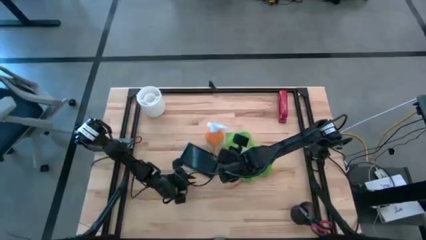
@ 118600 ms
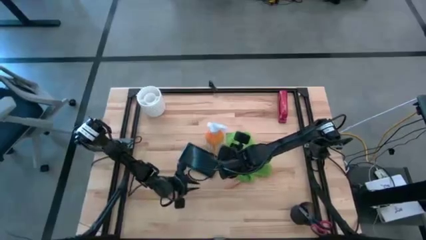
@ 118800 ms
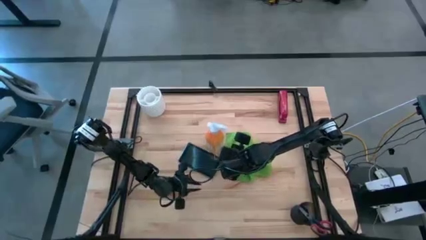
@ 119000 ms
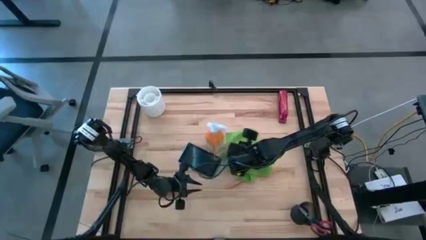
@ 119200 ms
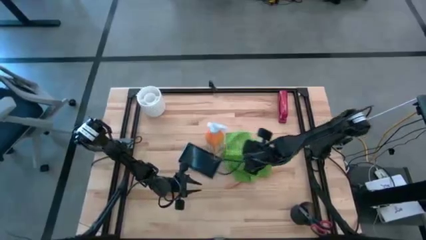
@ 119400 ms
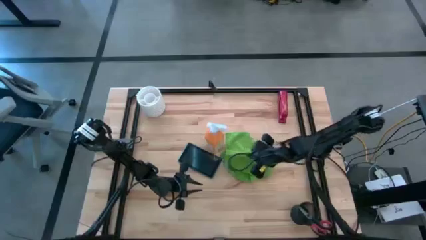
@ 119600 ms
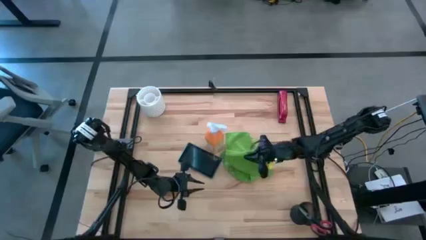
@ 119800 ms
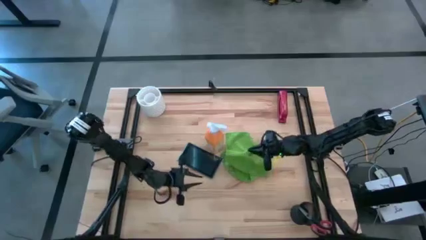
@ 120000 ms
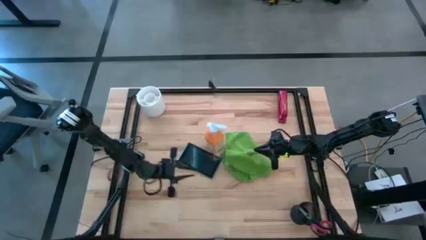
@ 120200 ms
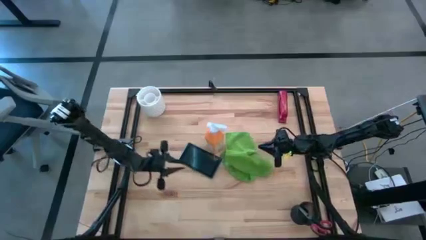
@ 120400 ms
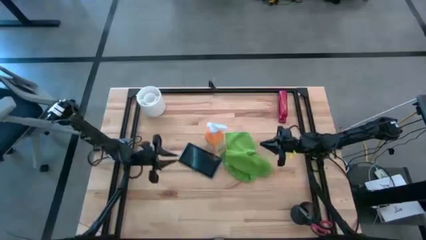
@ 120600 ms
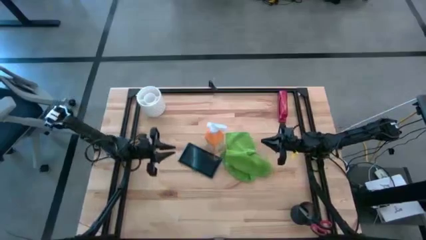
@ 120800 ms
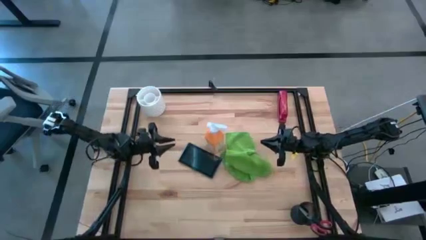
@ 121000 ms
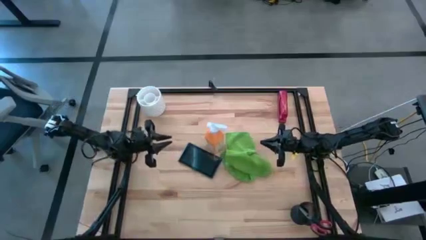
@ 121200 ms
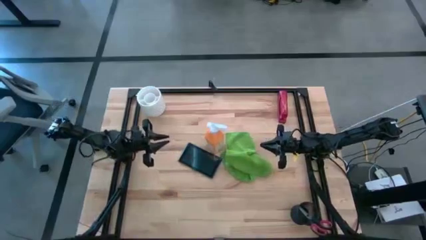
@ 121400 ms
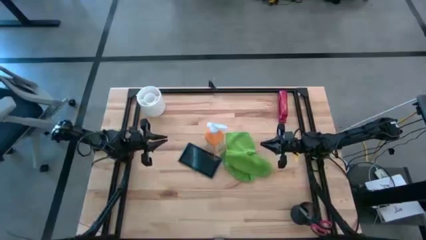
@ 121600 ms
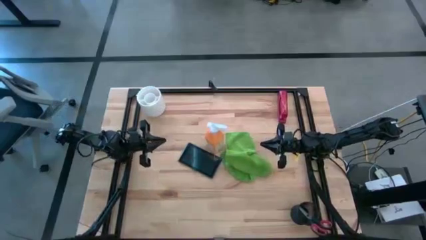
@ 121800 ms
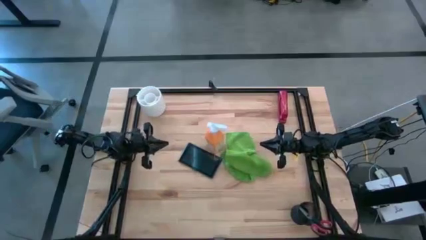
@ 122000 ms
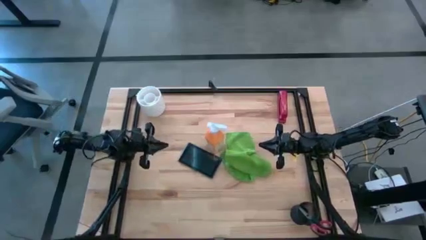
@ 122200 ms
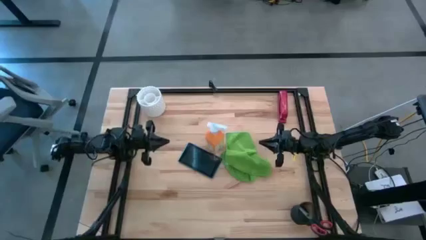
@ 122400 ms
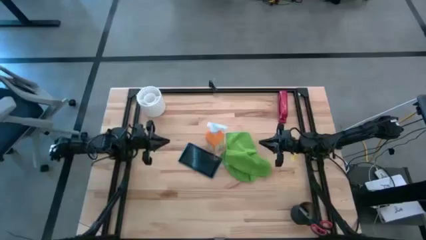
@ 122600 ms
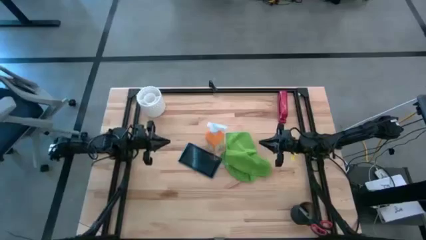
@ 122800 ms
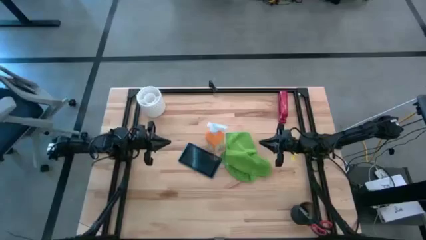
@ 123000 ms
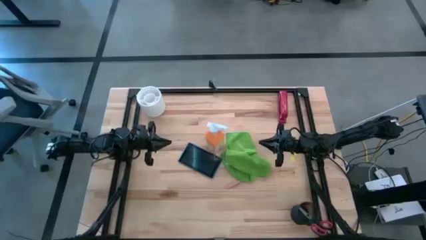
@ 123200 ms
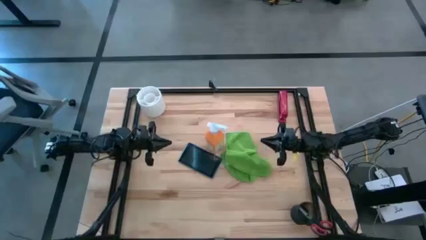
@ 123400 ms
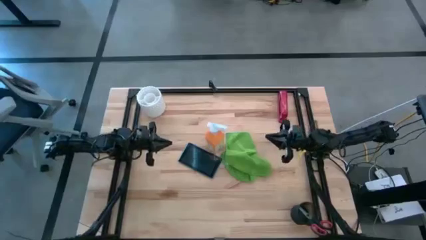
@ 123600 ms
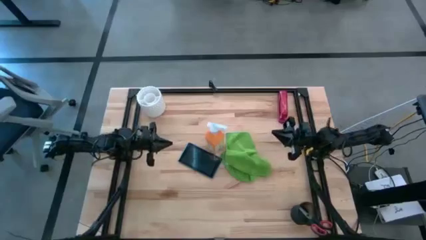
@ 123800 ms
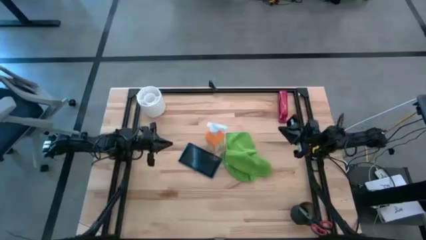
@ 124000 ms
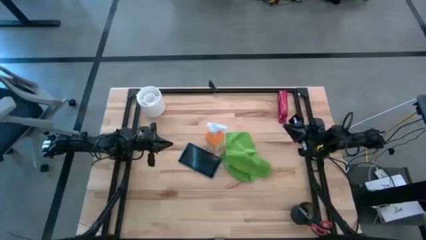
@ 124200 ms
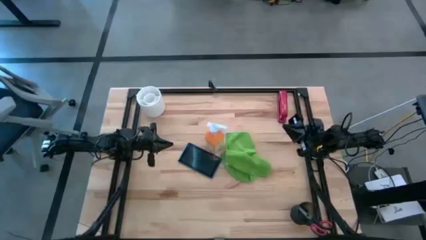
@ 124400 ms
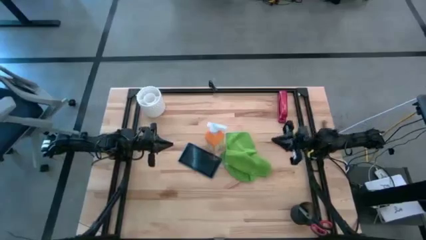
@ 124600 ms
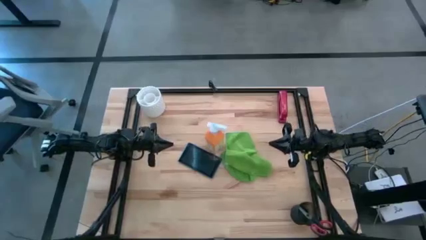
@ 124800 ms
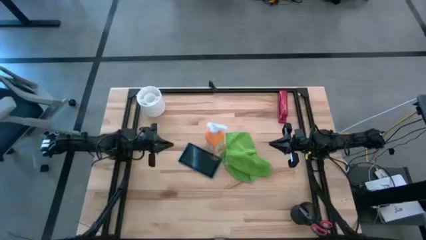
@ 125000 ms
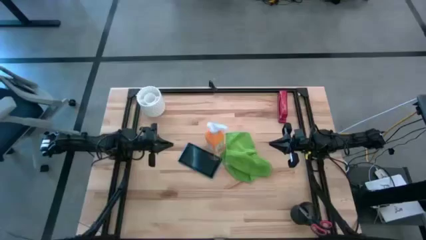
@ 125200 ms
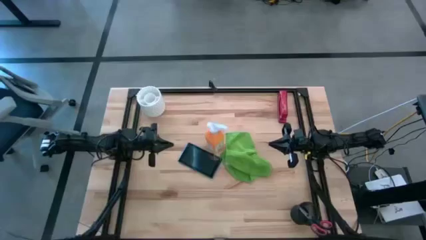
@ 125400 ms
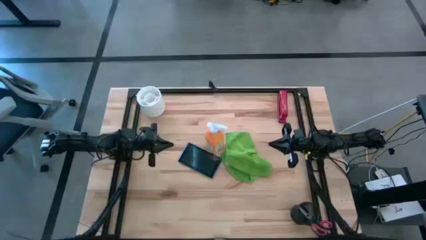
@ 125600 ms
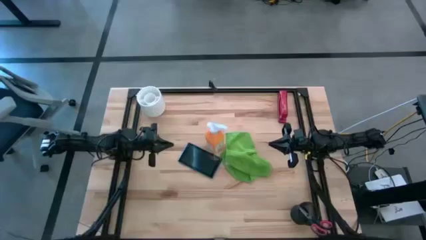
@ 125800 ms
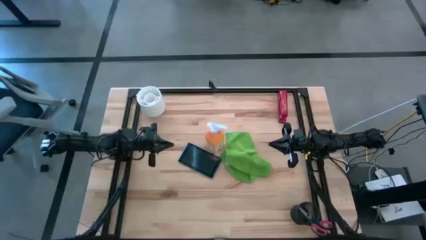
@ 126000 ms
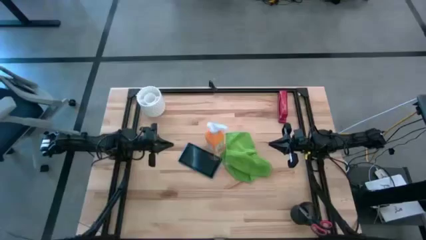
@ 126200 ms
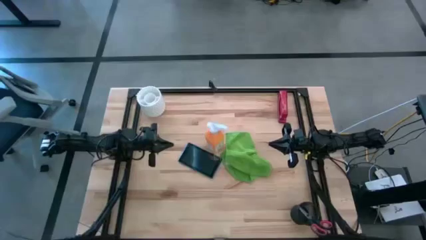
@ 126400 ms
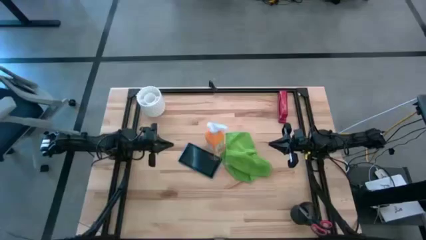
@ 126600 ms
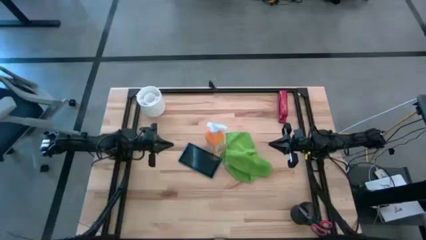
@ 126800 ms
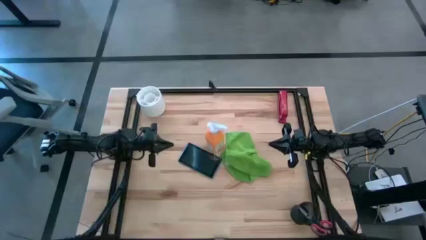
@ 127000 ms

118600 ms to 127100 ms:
Task: Apply microfiber cloth
Return to Home Position
